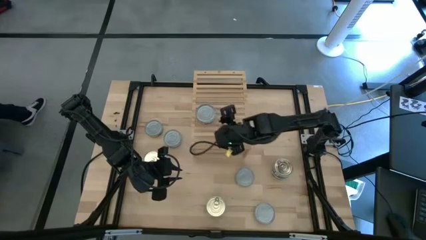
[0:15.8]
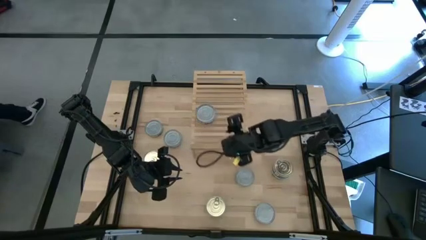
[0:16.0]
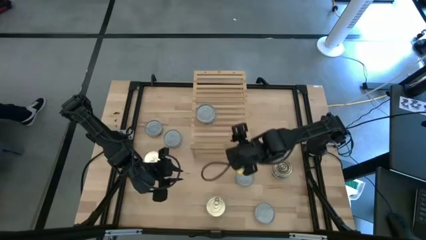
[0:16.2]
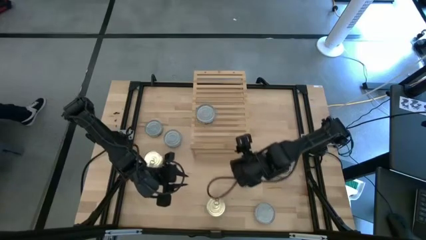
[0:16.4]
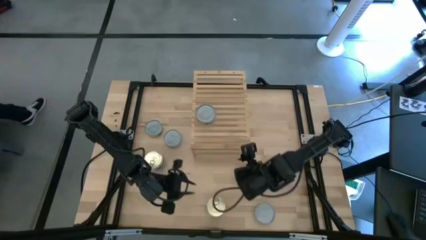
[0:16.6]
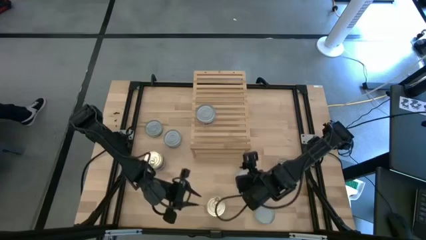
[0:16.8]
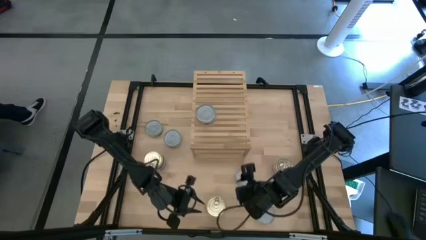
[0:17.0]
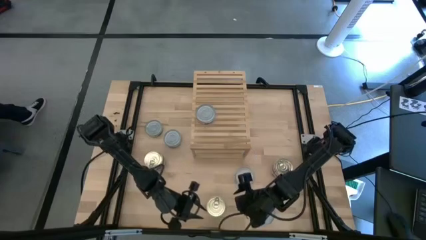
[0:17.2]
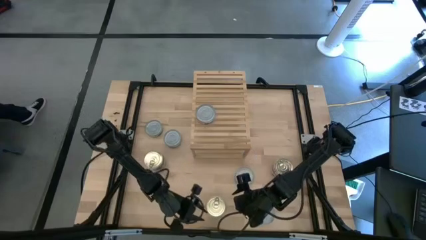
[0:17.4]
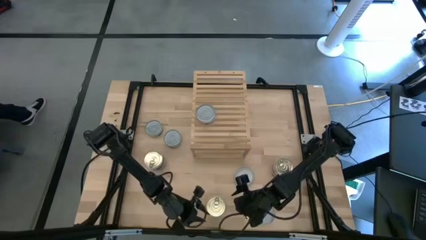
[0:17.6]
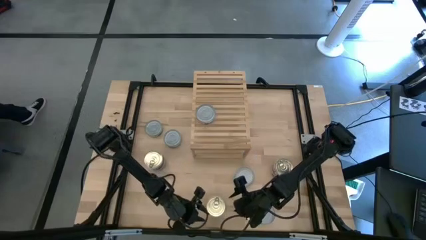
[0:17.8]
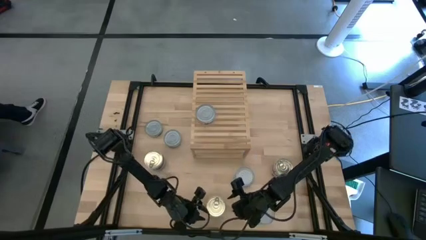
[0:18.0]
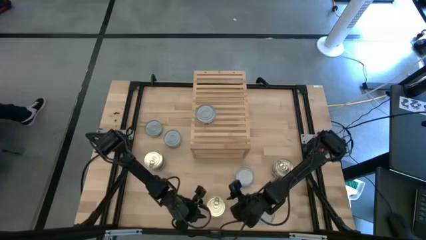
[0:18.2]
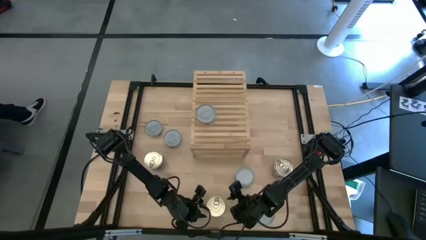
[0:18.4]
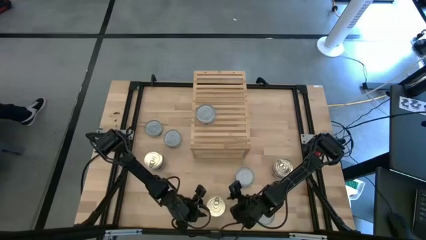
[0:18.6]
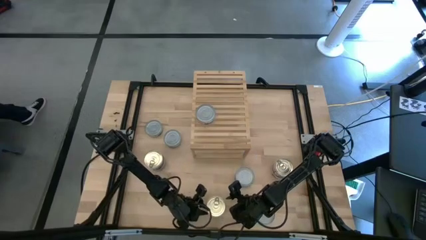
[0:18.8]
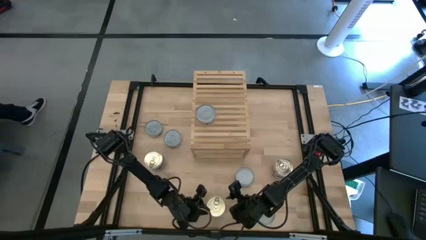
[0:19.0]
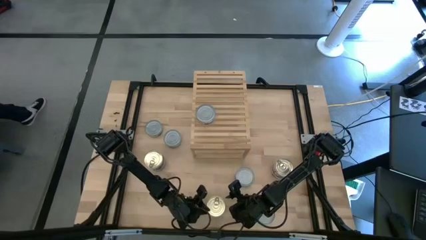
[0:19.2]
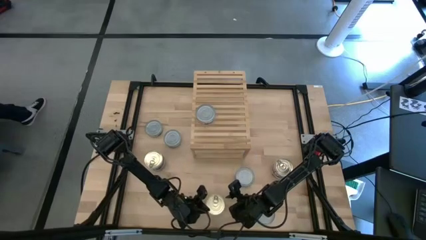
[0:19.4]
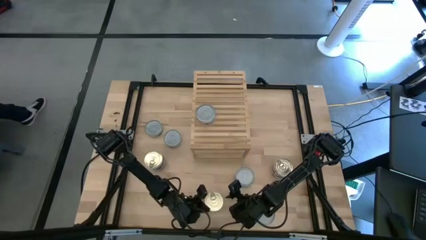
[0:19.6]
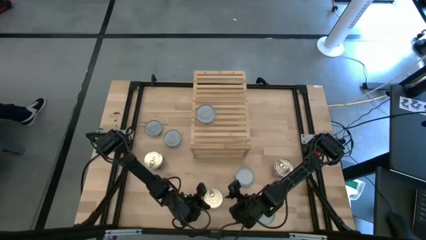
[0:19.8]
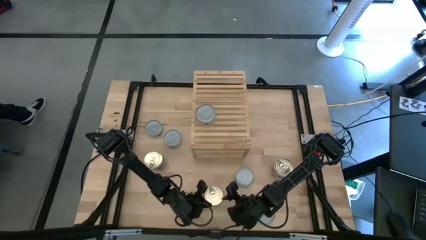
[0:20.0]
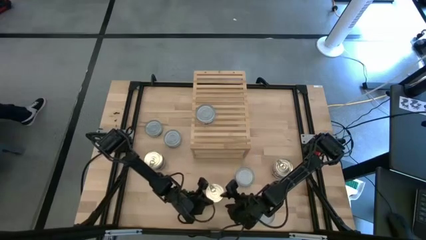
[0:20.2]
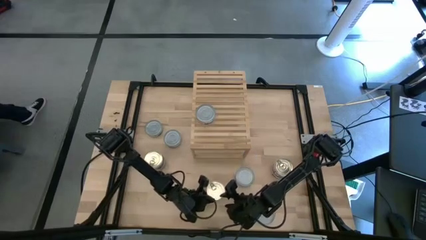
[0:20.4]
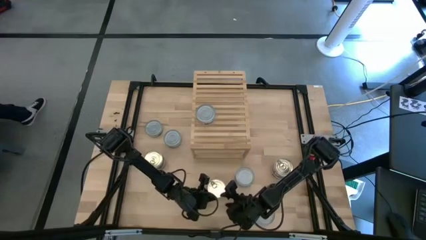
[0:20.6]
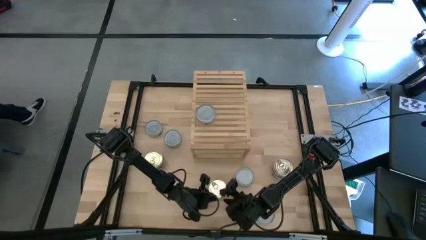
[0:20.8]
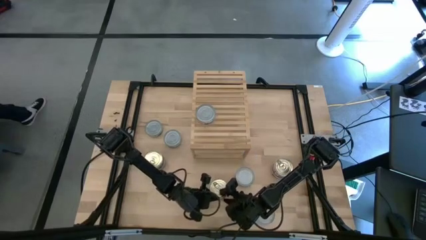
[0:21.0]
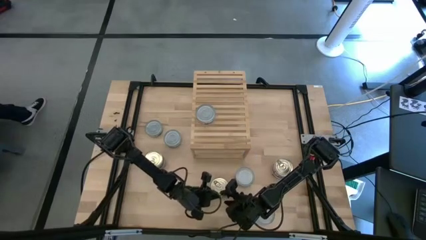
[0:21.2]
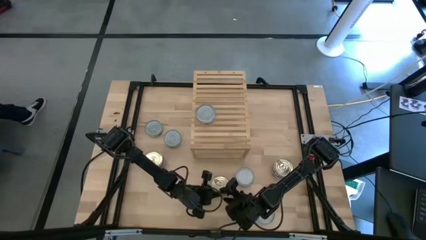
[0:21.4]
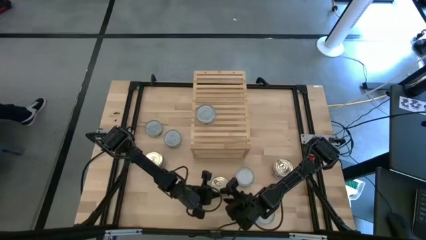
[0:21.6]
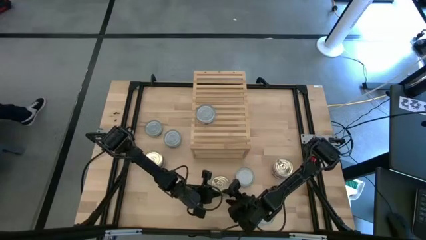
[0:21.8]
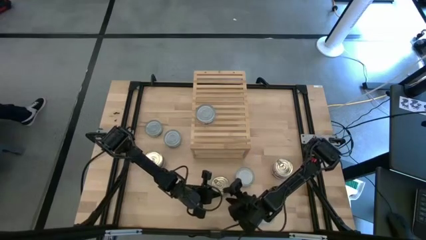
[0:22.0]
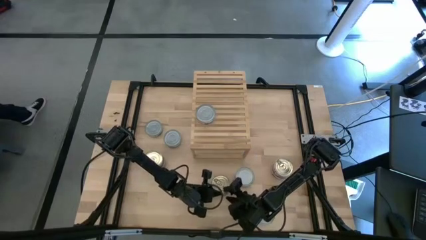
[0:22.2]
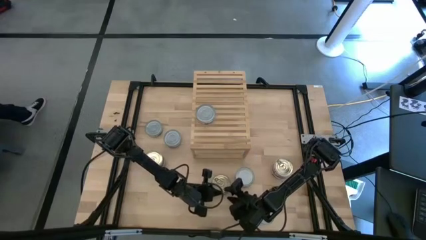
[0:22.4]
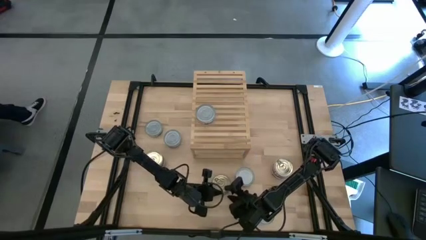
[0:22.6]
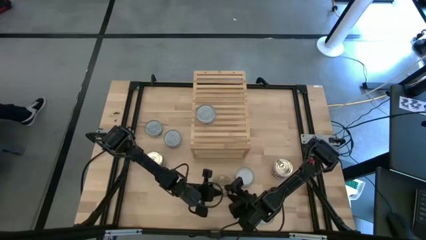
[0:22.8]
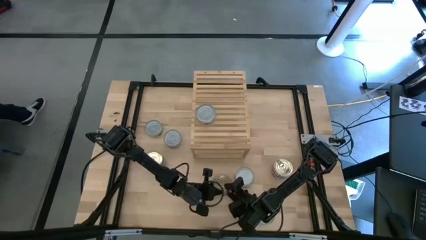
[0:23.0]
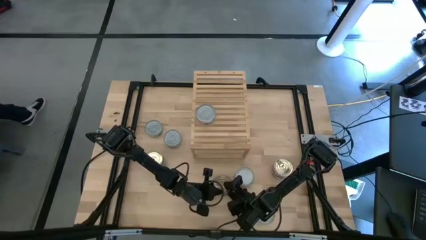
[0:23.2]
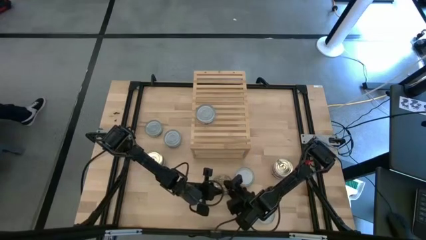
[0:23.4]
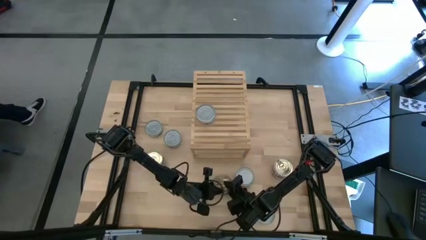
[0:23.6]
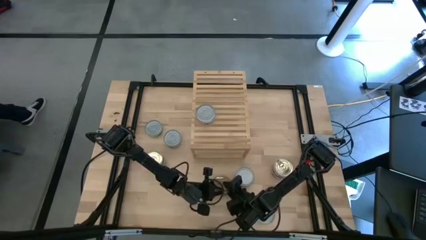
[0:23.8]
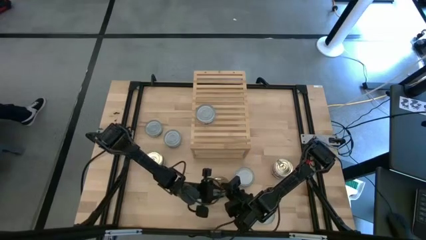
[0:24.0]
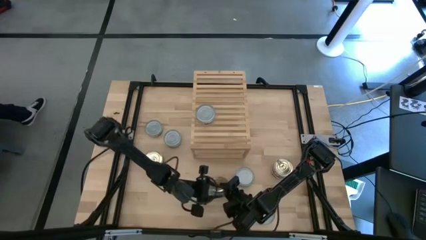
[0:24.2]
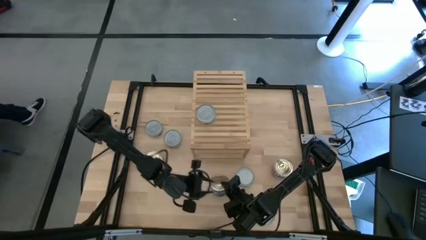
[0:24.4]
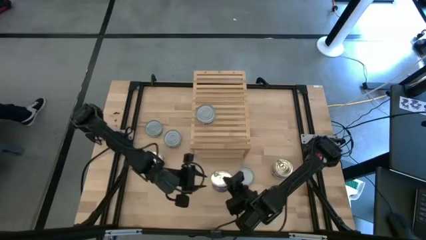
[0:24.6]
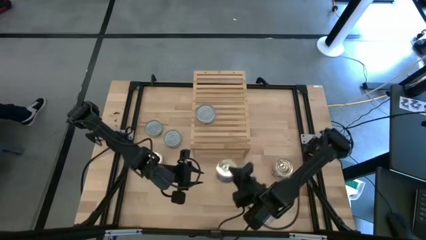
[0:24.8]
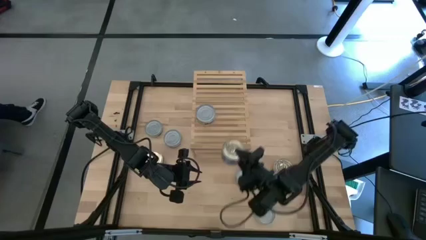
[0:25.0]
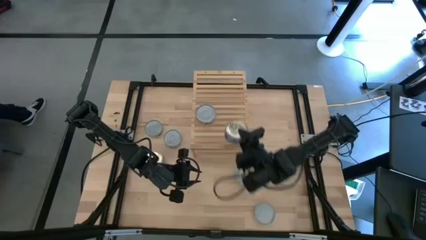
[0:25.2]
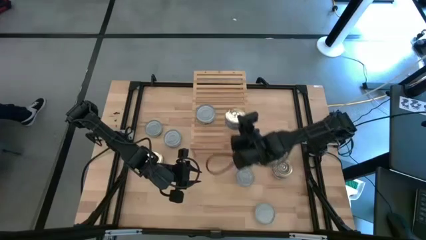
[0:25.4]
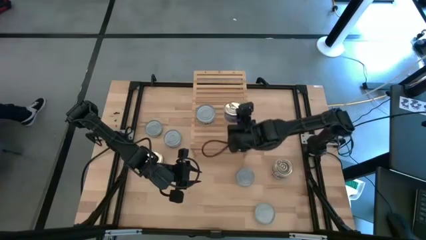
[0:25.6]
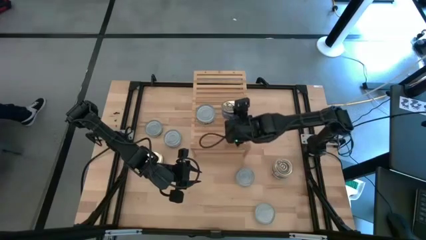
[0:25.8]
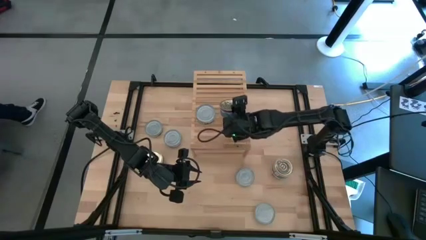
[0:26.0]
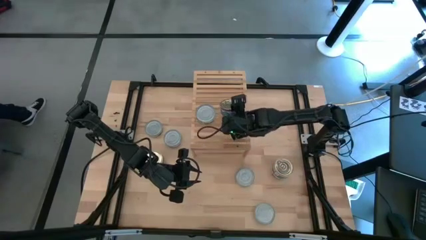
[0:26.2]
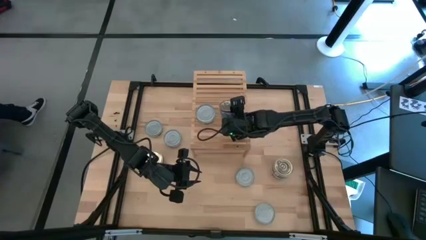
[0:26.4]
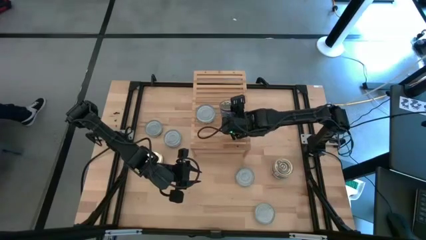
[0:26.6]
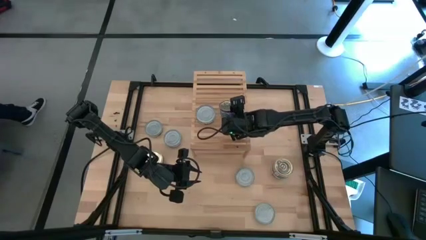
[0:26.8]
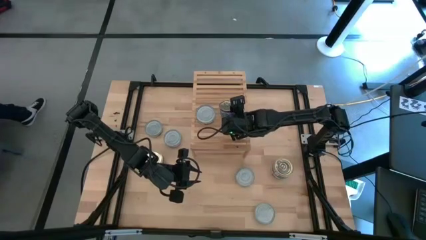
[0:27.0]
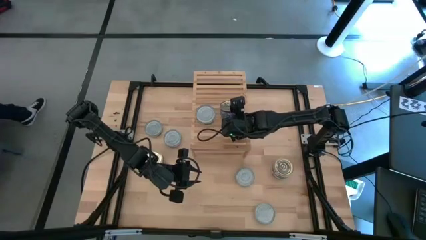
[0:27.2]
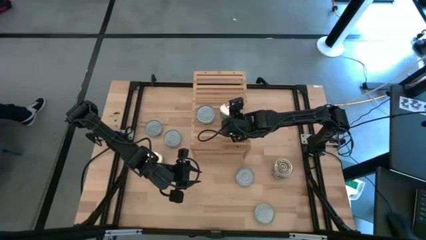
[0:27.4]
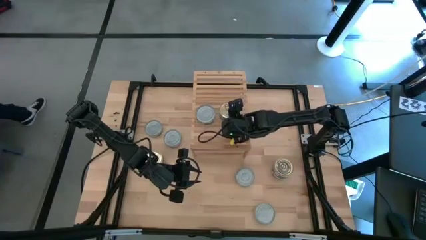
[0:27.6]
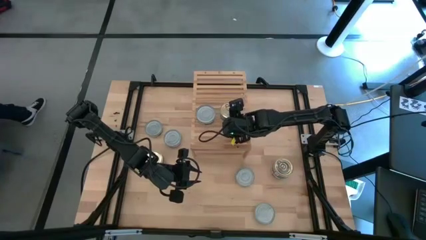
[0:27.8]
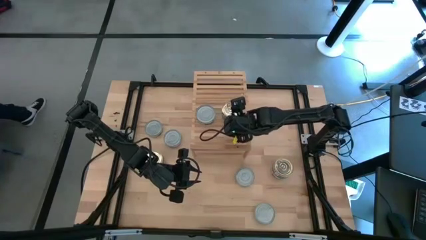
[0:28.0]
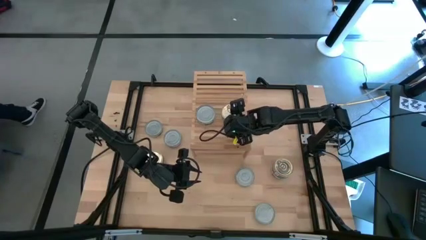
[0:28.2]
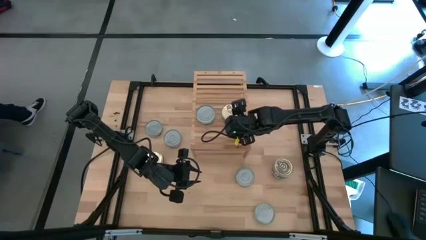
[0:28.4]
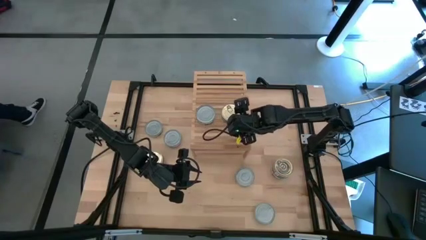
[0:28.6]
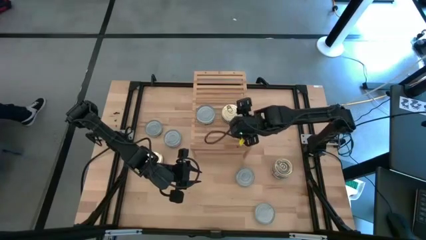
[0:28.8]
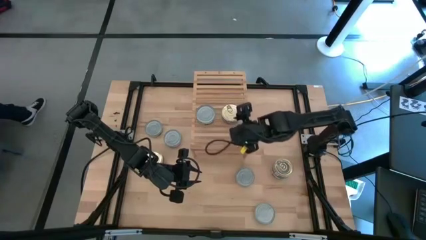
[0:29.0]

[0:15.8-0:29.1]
Task: Stack canned seafood by type on shelf
Put the blue tuna can on the shelf
